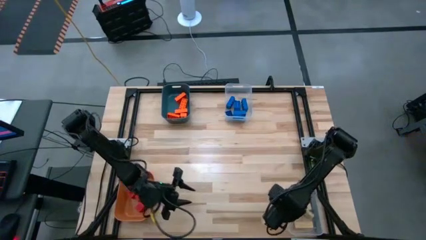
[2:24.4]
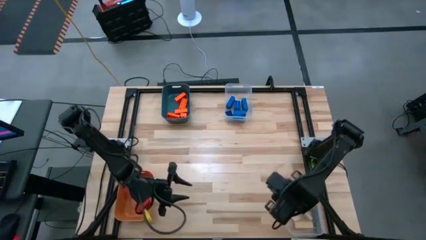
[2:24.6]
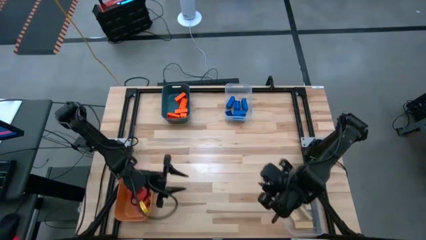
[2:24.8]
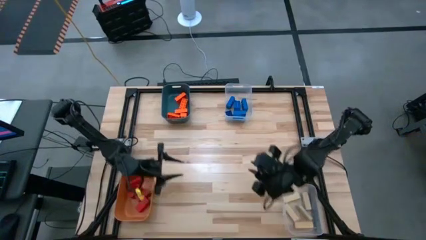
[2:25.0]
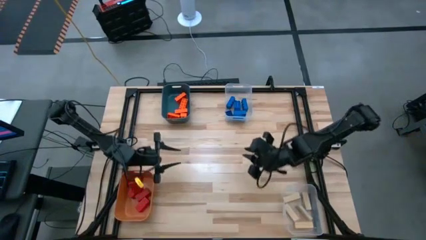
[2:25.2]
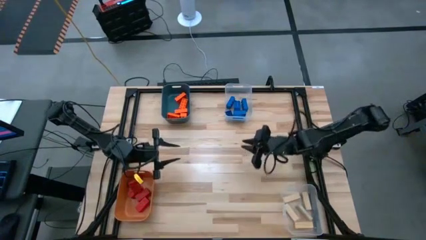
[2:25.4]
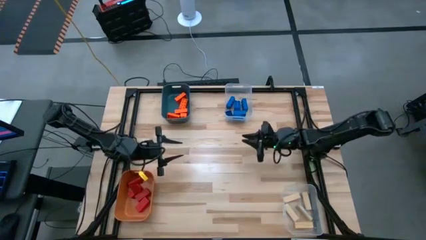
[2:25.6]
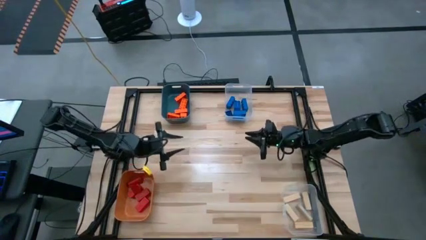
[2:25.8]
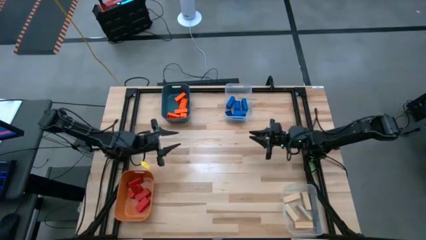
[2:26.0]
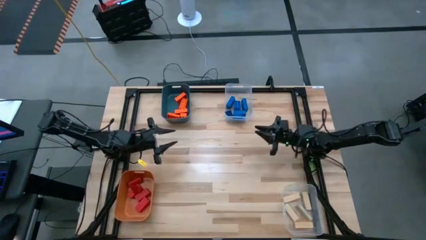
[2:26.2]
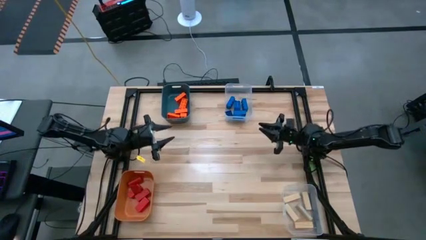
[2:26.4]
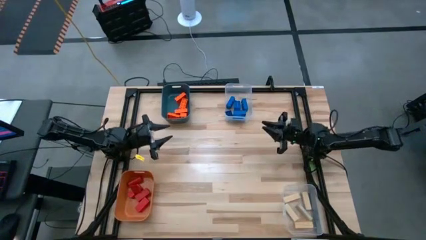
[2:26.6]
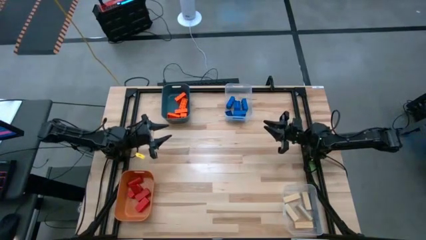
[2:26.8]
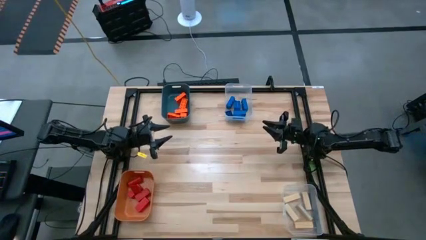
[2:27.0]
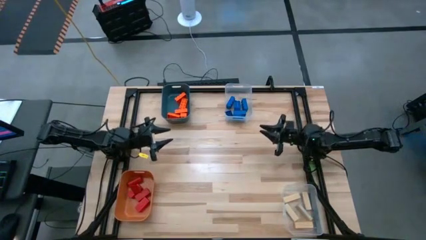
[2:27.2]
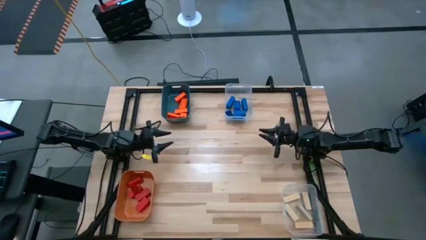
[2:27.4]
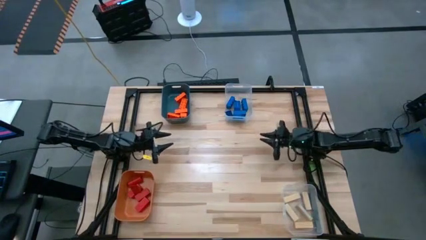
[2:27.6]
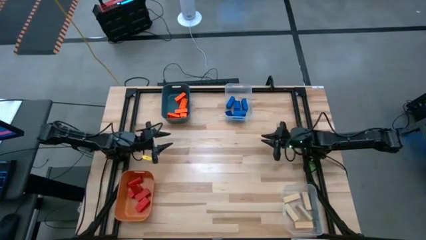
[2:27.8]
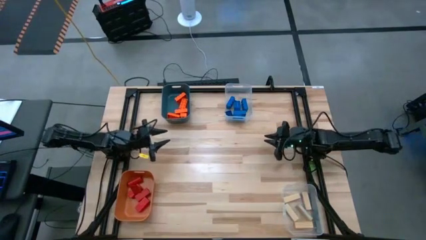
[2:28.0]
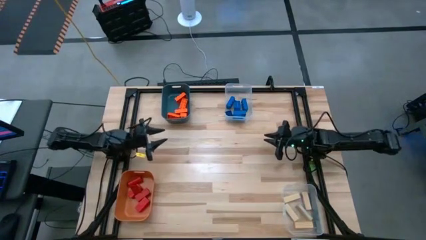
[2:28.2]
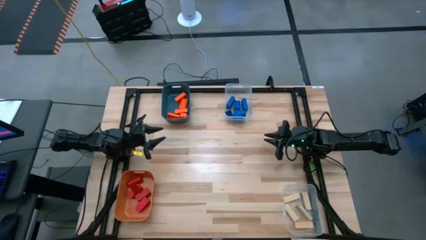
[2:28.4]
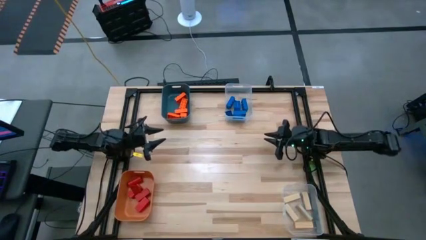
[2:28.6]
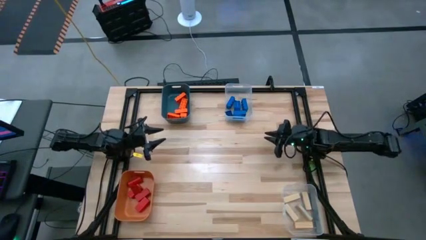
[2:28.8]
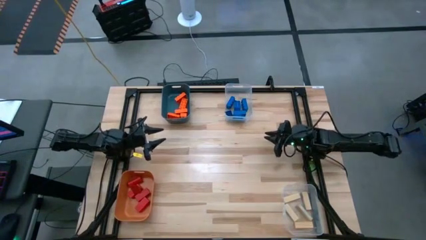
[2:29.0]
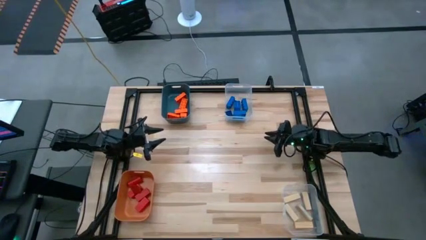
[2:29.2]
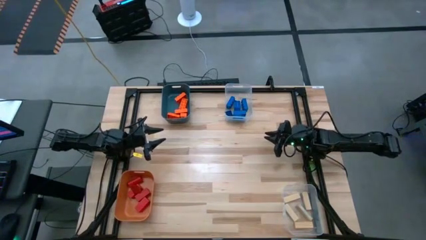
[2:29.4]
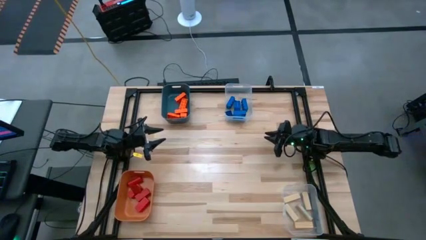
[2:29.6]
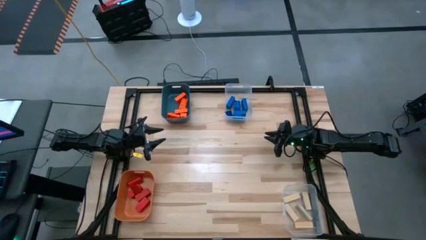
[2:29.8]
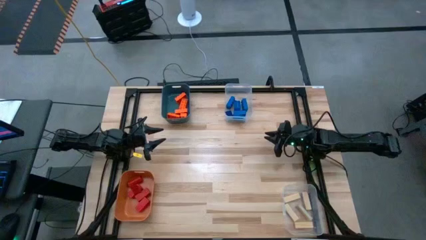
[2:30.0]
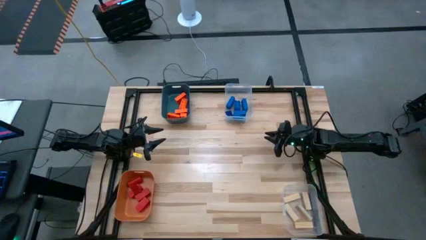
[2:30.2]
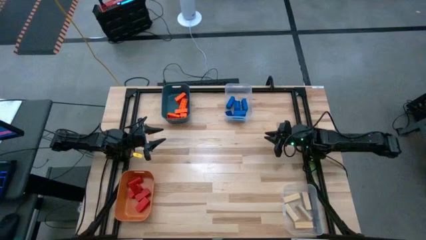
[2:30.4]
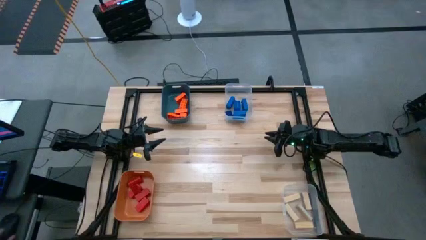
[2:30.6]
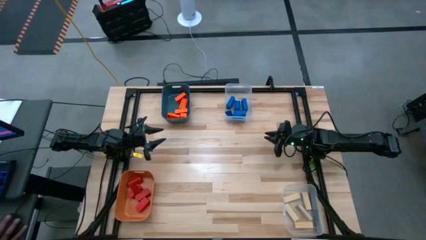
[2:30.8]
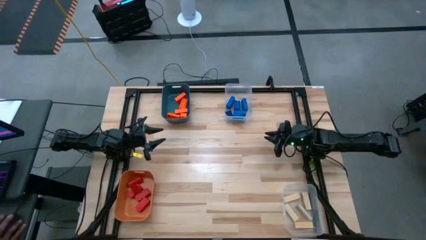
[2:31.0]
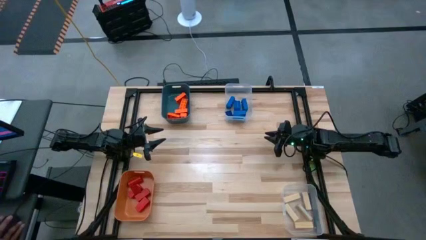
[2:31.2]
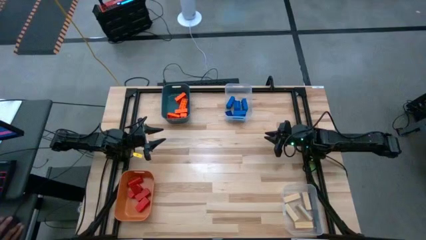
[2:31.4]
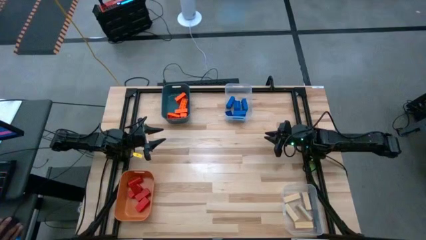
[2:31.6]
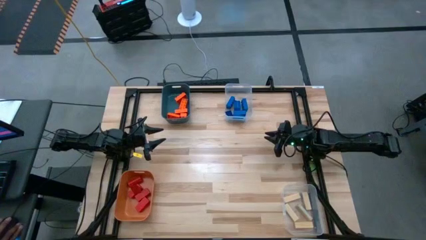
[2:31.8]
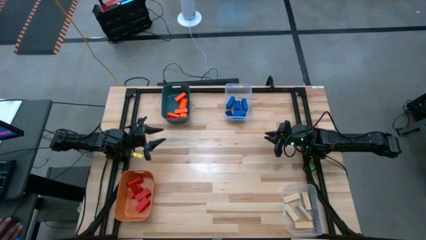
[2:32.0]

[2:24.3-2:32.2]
Task: Sort blocks
Return to Home Position

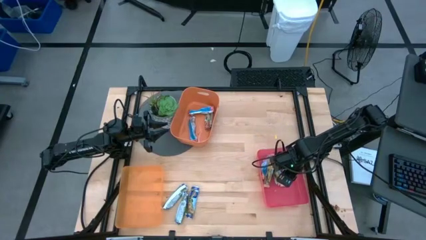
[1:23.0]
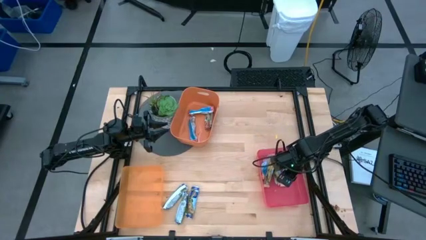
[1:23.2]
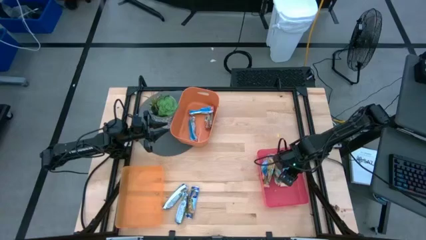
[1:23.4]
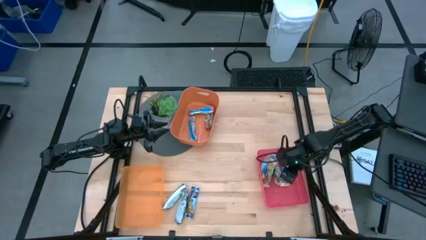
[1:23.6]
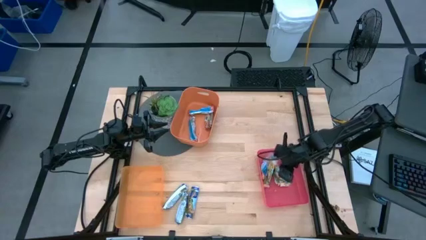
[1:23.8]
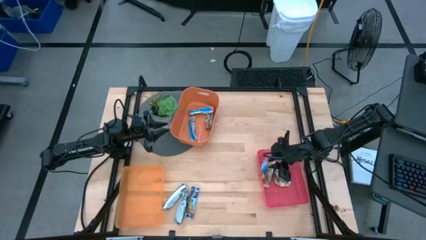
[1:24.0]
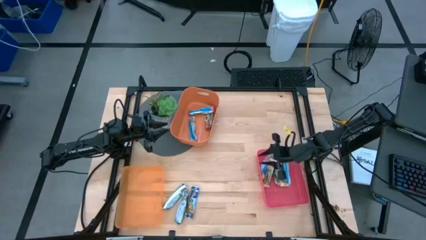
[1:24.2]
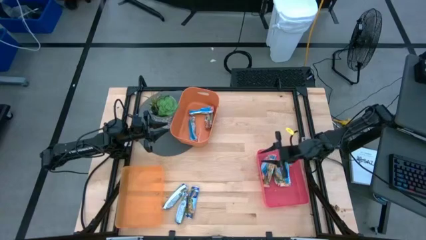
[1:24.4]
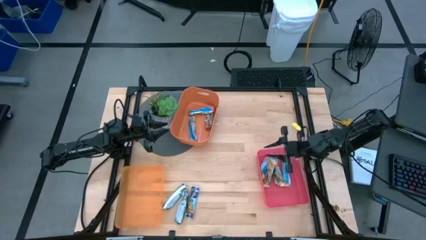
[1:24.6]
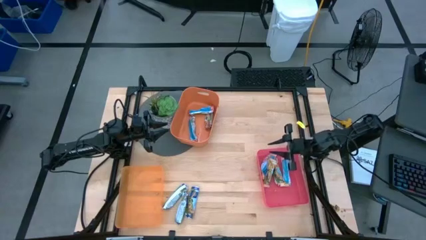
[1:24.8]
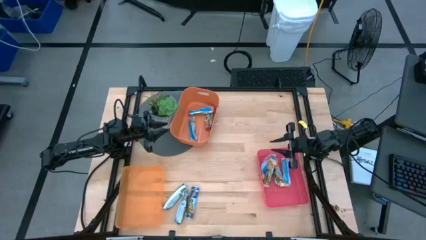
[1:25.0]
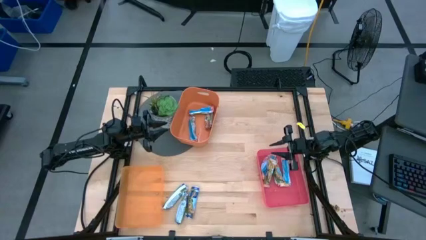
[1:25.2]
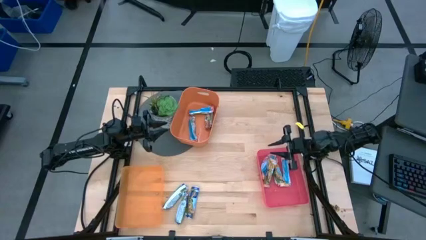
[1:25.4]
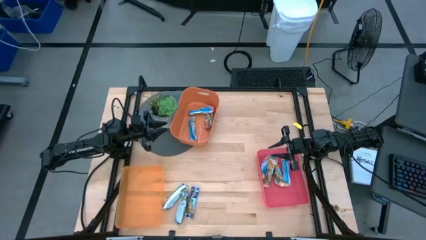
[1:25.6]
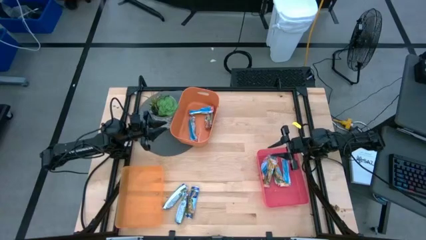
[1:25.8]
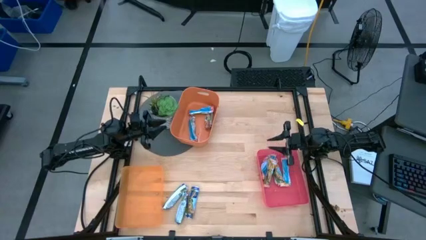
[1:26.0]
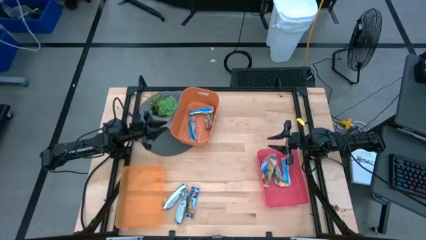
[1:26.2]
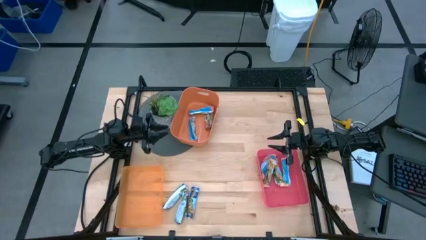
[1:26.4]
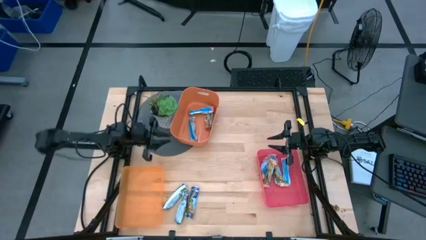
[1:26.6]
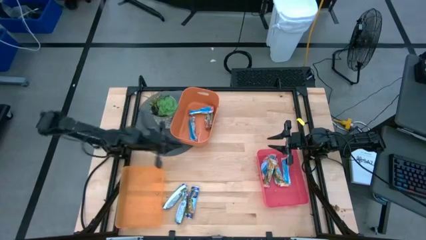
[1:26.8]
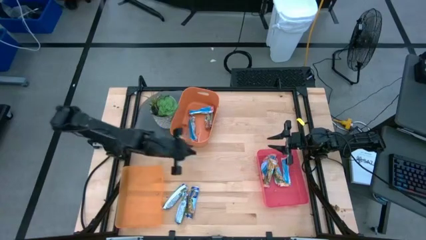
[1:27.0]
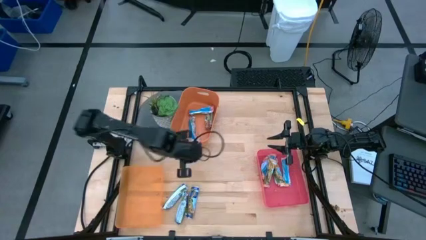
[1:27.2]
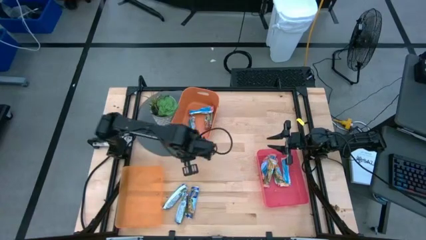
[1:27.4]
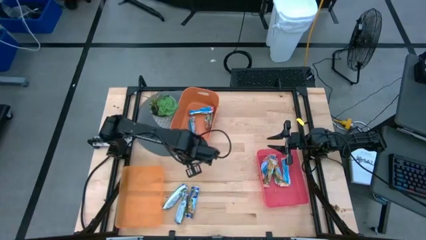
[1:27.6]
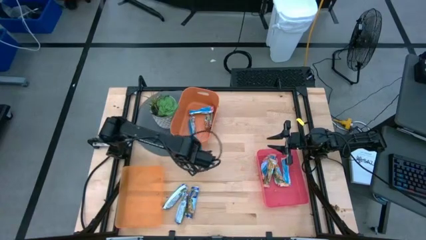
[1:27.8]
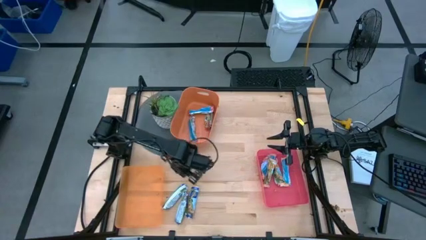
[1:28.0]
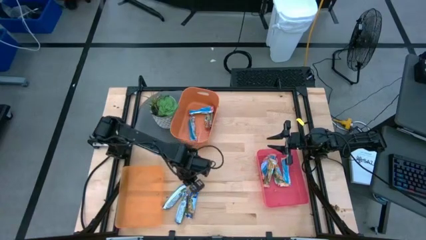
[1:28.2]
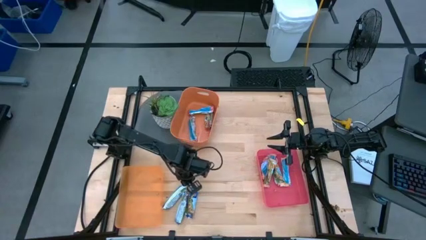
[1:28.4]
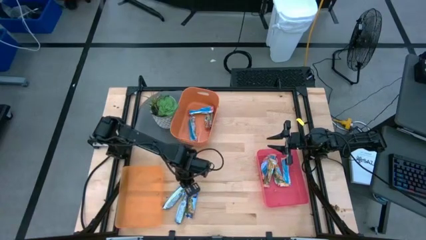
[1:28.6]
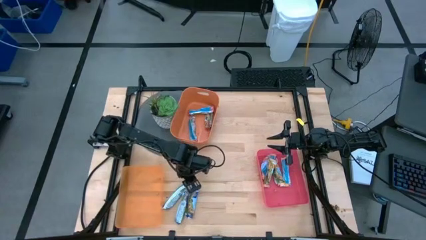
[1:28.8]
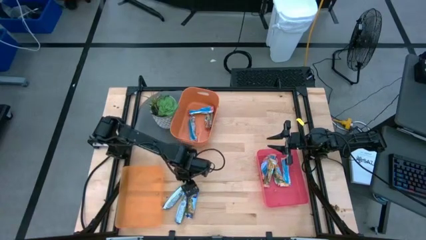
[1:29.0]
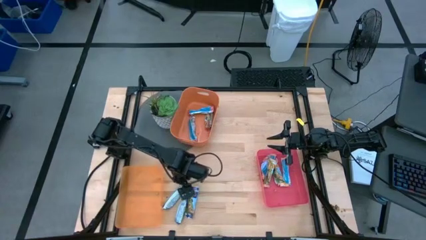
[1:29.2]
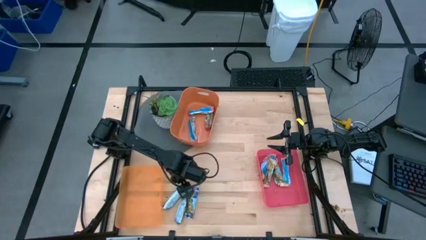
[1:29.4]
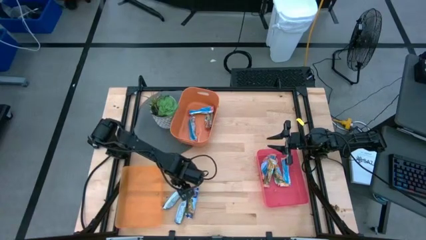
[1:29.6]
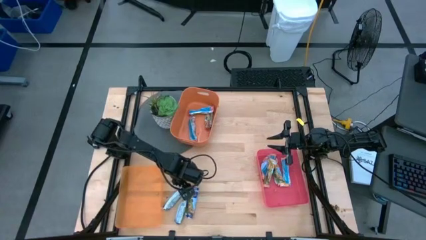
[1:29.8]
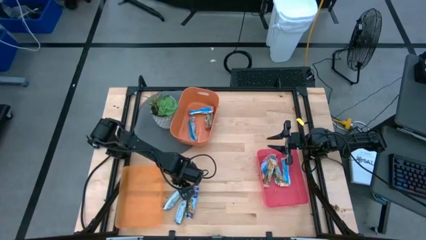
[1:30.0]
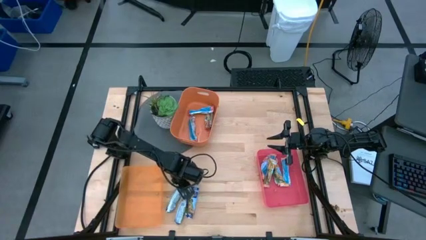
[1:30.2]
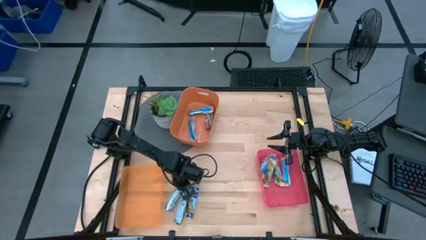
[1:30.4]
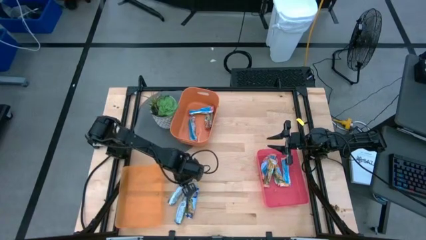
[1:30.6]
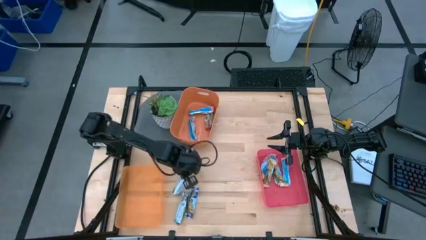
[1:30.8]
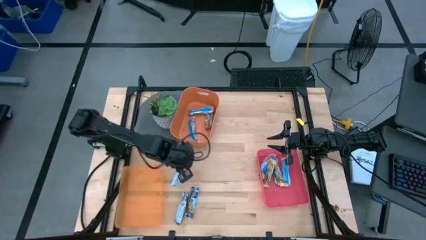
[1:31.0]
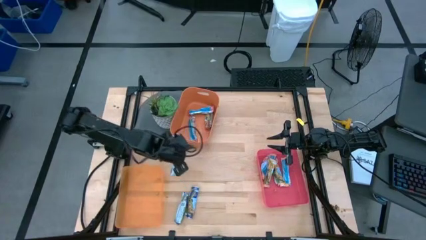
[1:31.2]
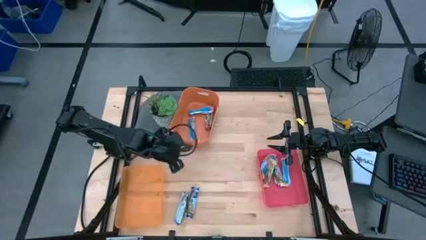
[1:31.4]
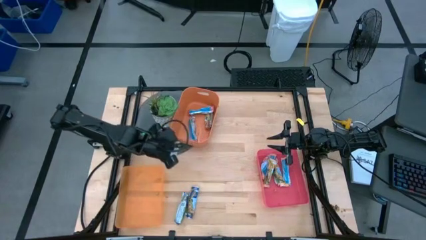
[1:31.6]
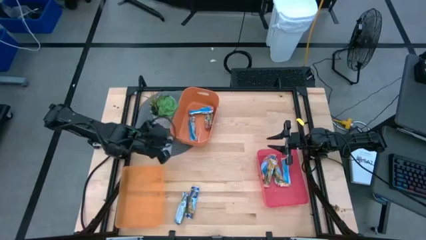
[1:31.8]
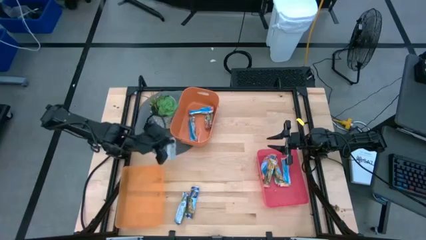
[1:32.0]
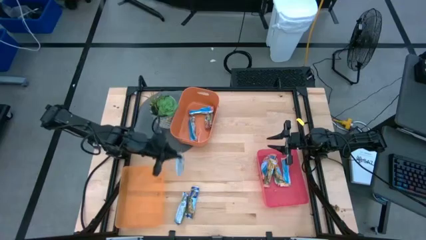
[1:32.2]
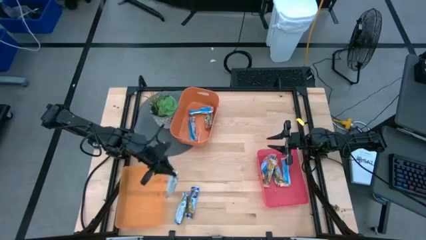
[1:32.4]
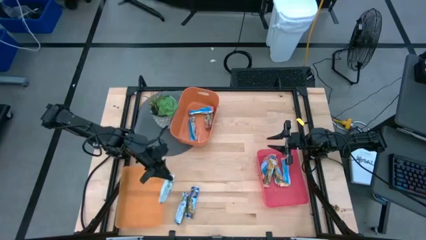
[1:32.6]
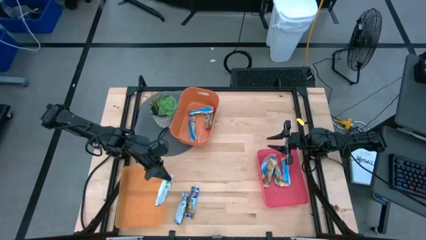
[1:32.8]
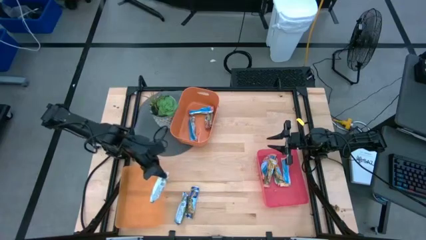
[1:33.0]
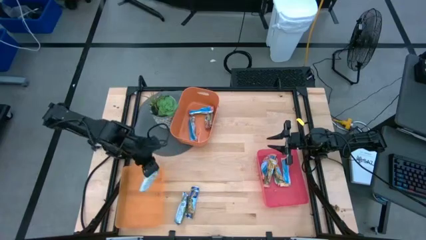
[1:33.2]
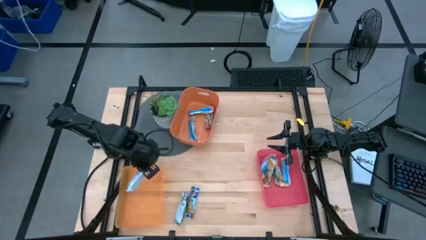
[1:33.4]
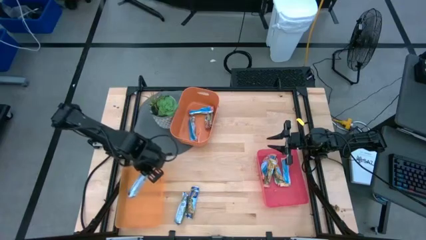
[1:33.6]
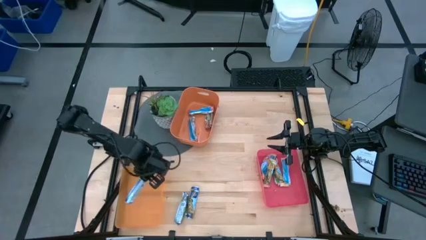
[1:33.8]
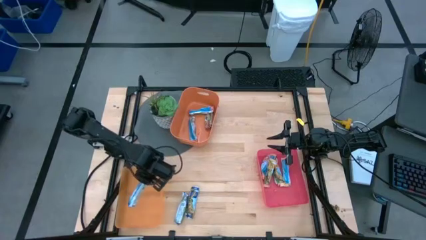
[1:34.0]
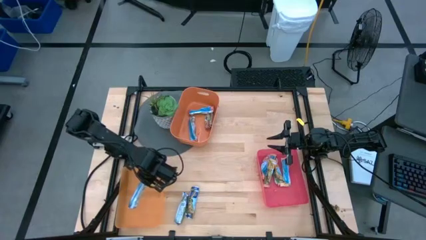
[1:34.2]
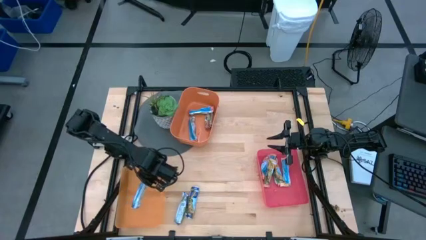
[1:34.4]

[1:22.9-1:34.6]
Task: Pick and place Granola Bars by type
Put the blue granola bar into the light orange bin
